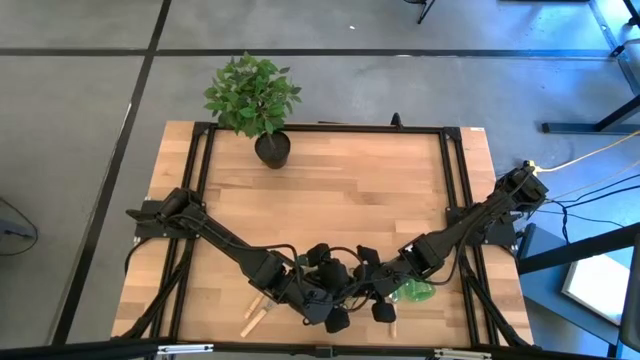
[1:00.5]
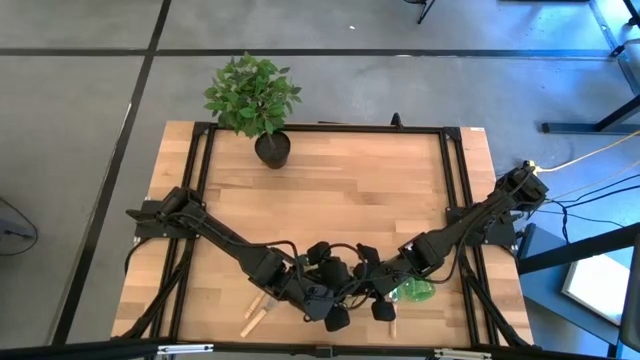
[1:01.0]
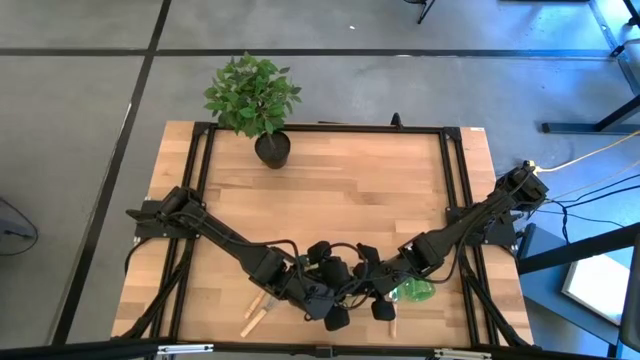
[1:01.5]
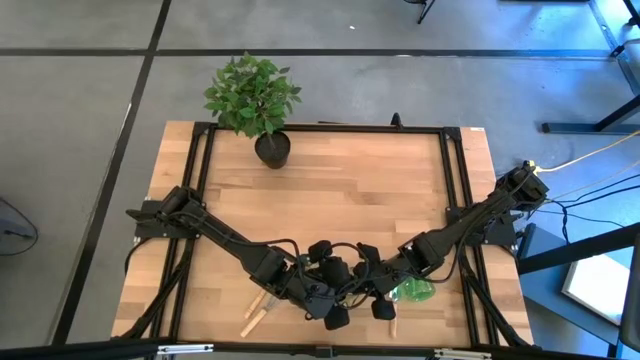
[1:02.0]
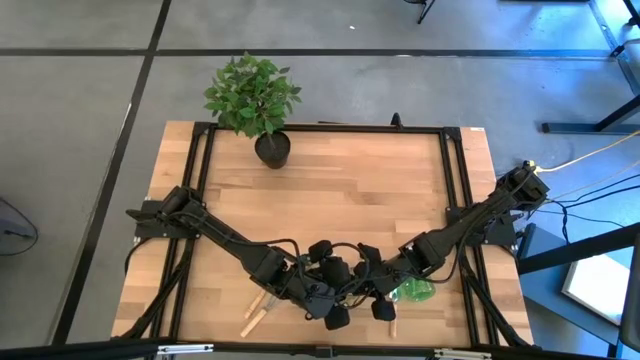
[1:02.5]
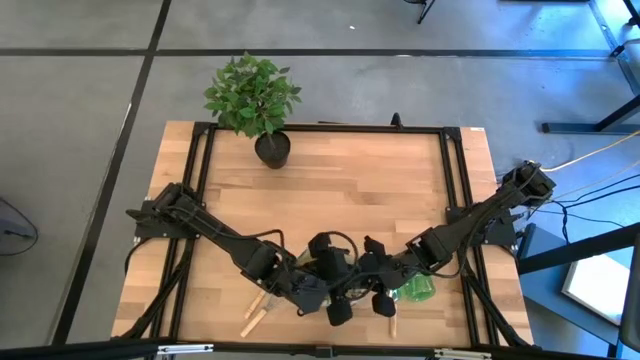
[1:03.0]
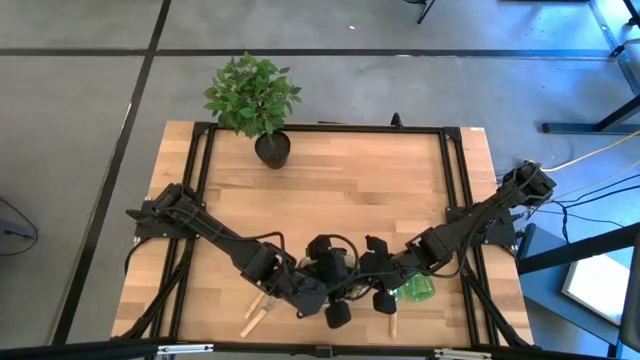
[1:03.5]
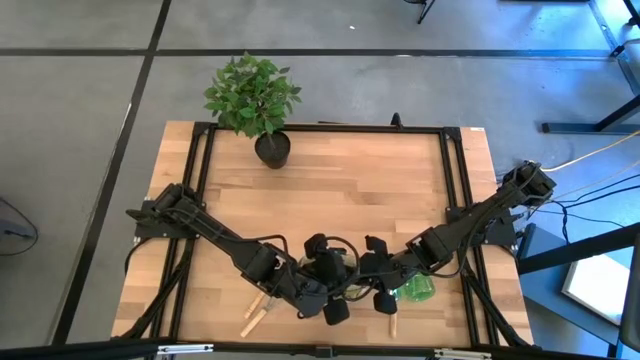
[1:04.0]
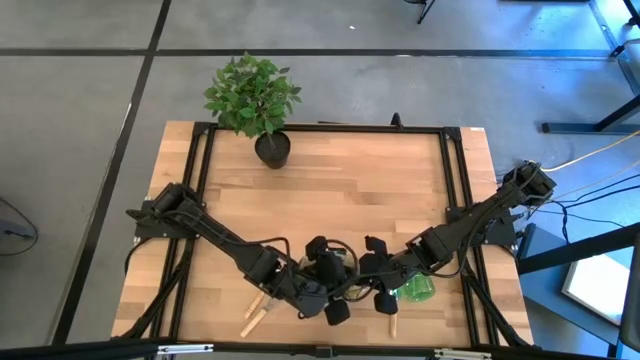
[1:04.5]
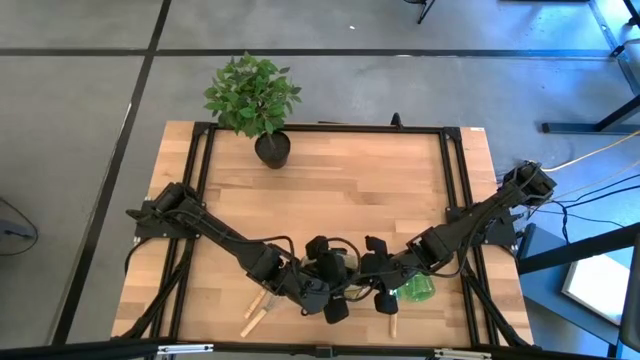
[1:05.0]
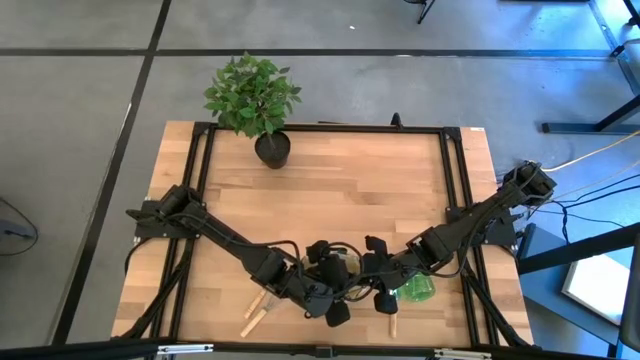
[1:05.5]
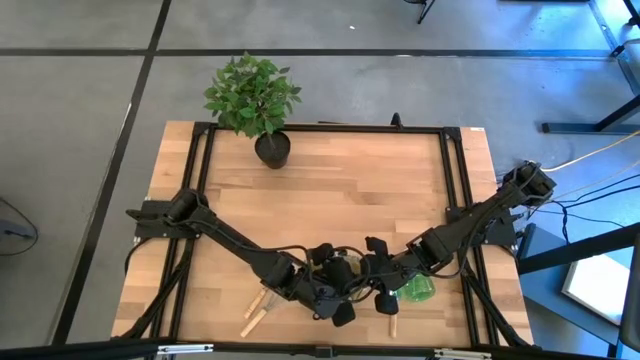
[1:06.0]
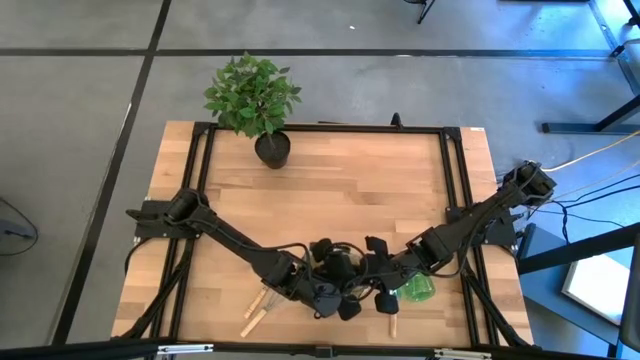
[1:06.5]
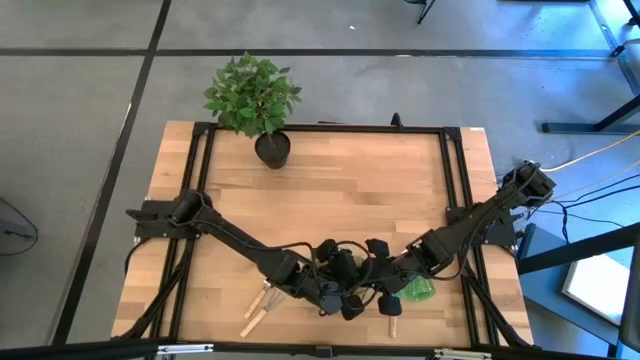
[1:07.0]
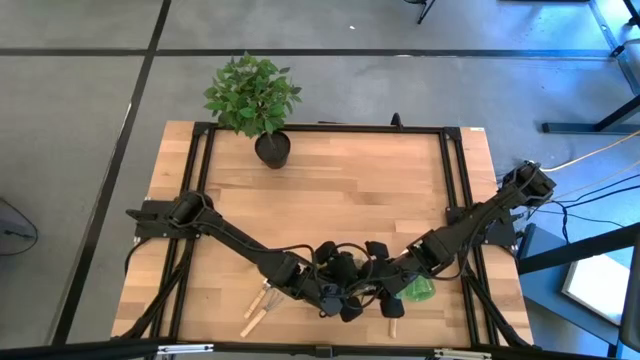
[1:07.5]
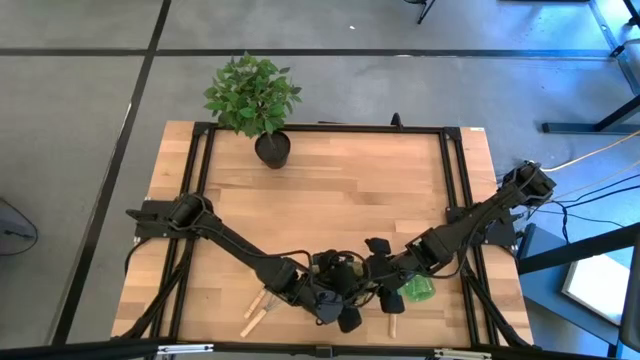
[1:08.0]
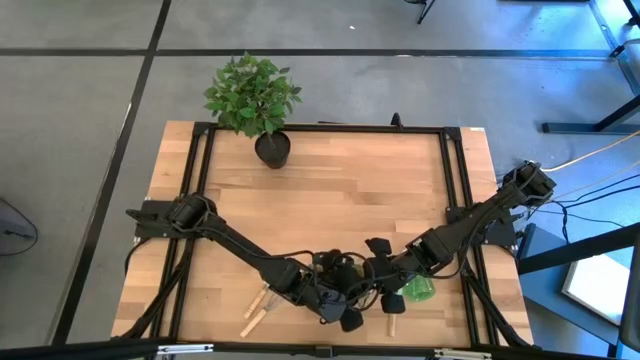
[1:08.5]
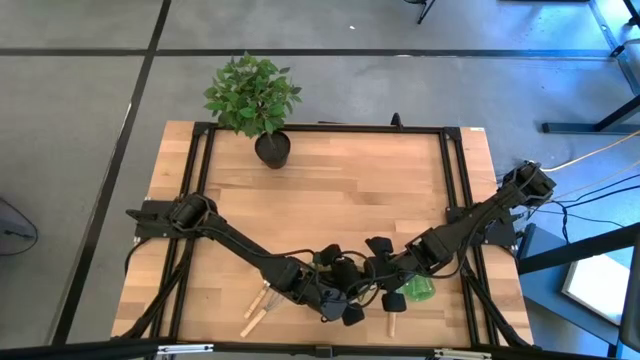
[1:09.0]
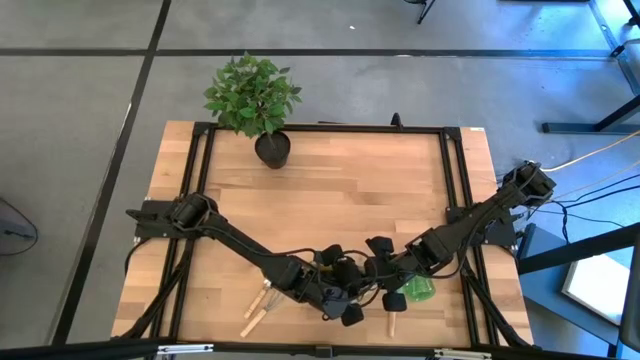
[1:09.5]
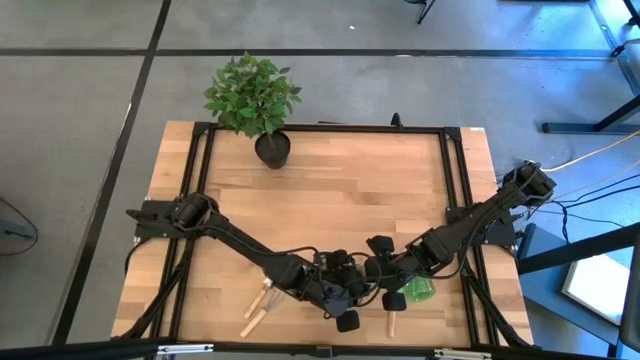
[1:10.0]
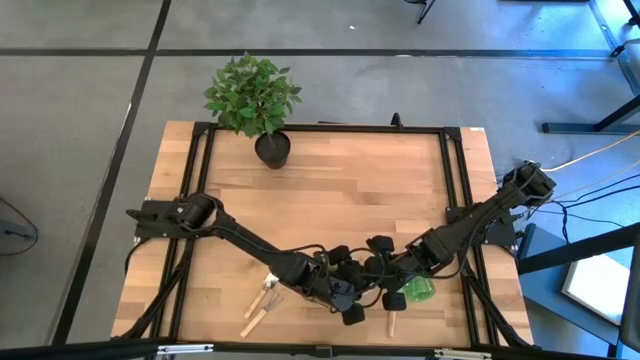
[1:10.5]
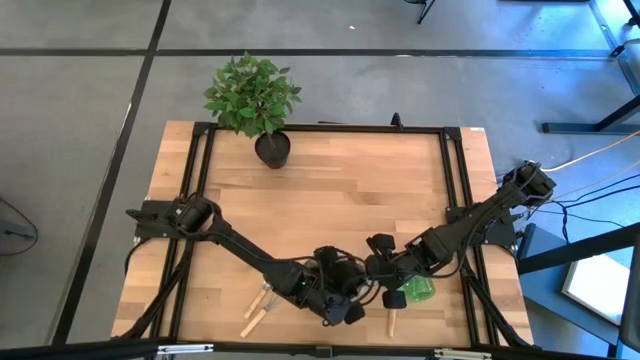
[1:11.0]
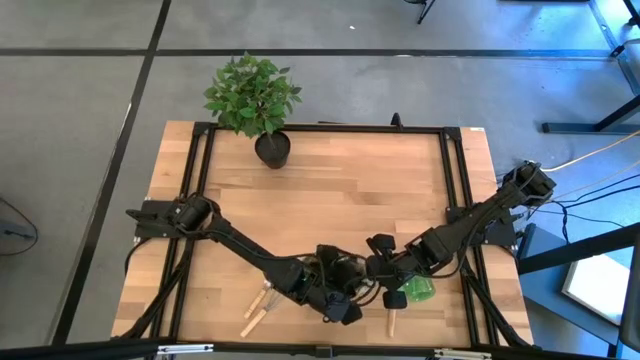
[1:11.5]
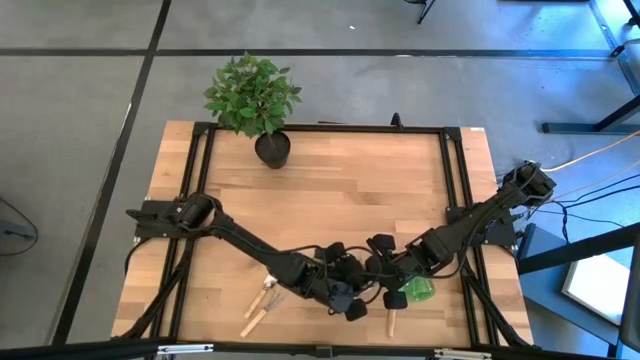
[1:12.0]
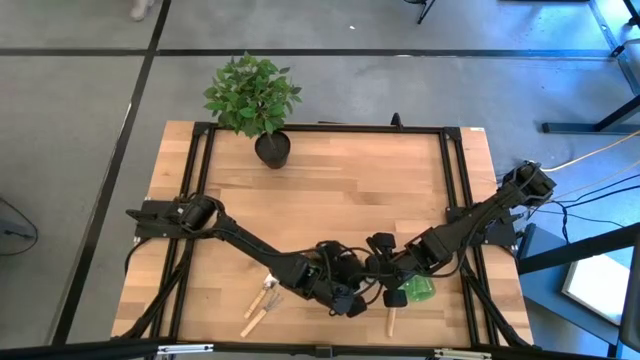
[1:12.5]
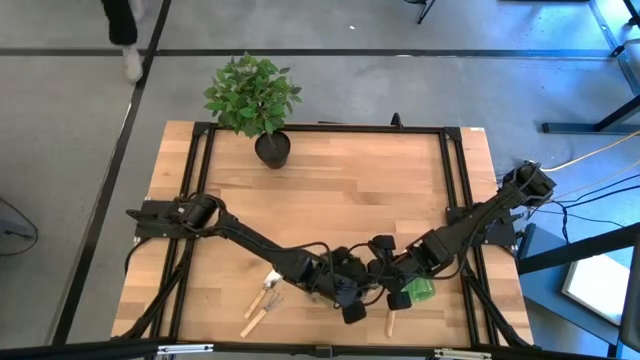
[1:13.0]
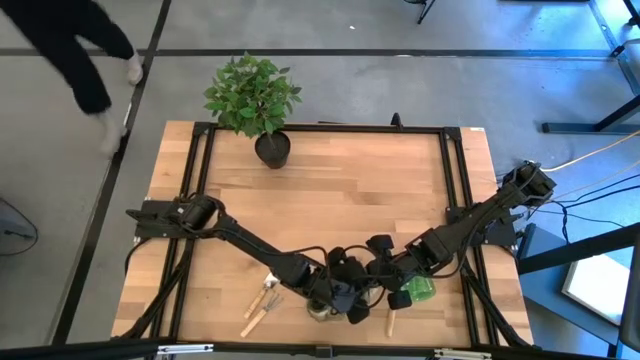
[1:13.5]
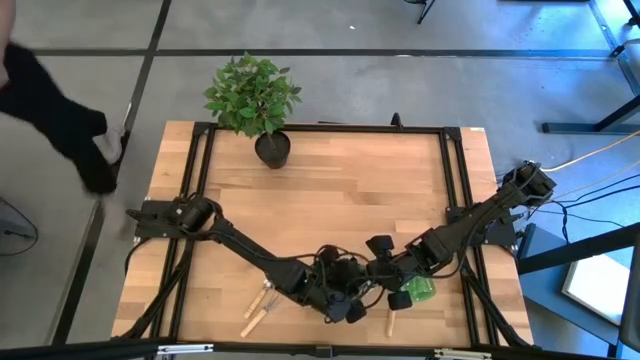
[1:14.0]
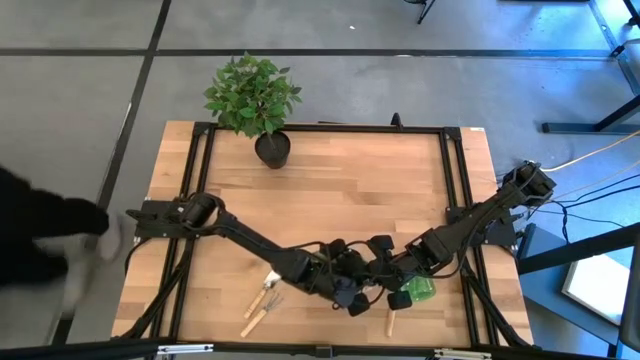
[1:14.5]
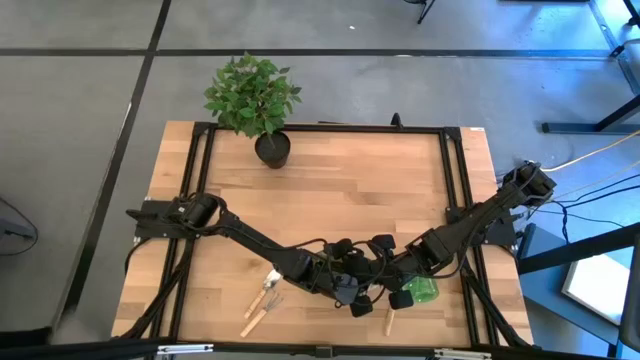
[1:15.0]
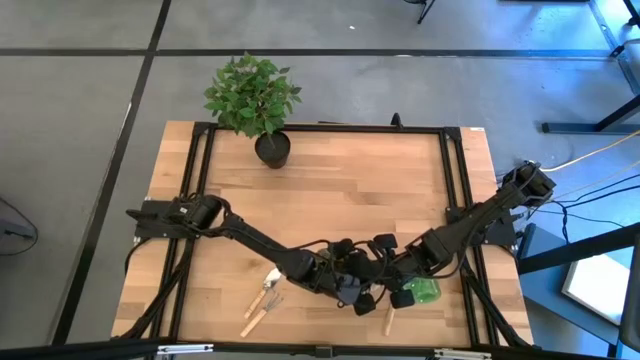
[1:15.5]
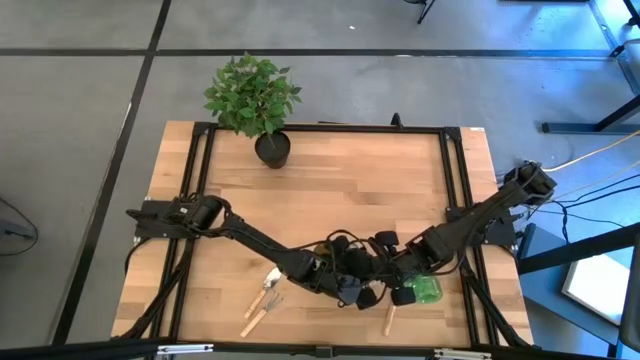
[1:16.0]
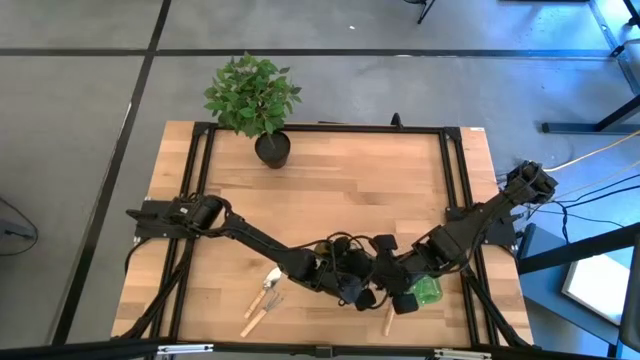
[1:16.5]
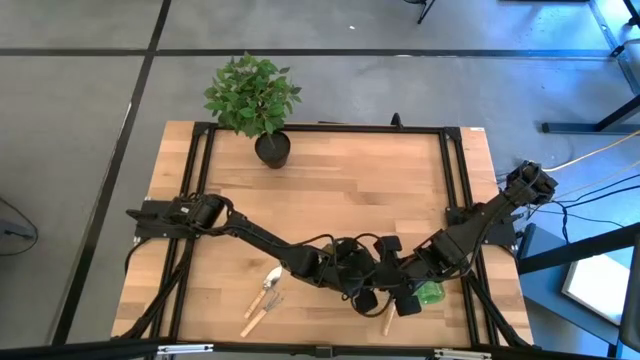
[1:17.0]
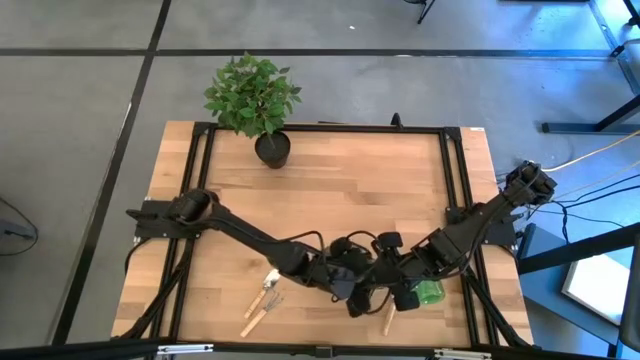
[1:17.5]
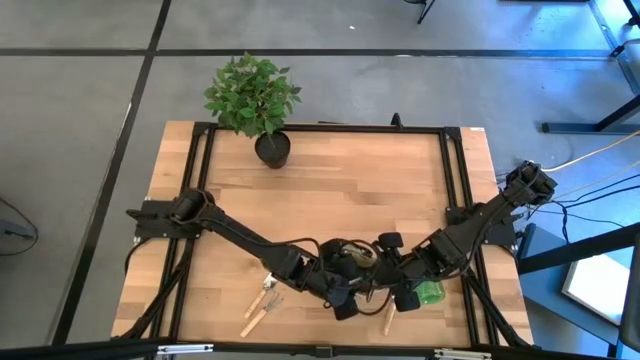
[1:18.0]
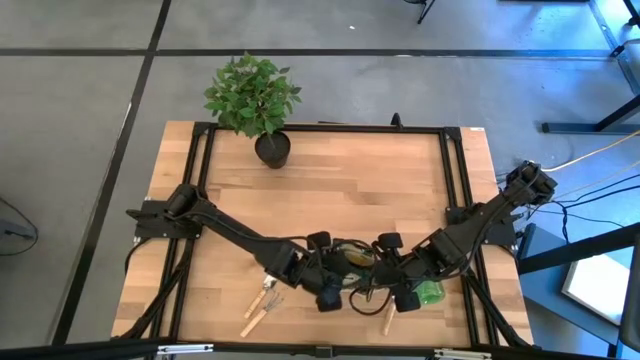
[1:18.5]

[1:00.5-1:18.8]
Task: Pick & Place Garden tools in Gardening bag
Put the top green shear scissors into the brown gardening bag
